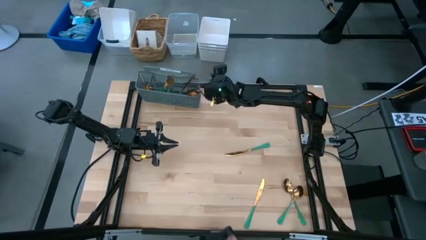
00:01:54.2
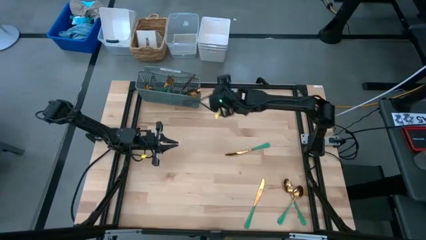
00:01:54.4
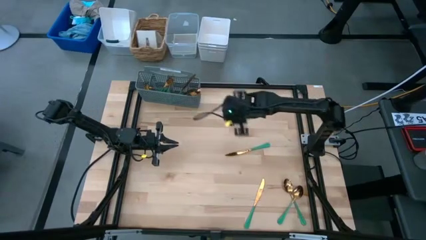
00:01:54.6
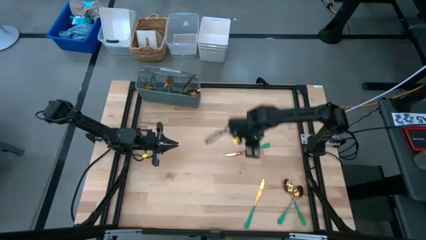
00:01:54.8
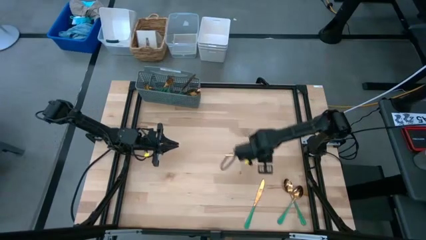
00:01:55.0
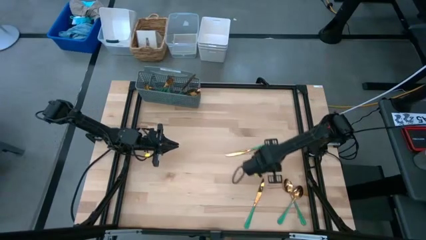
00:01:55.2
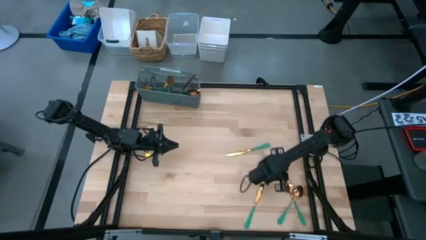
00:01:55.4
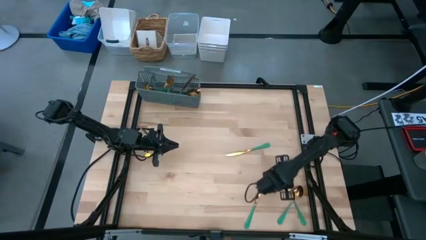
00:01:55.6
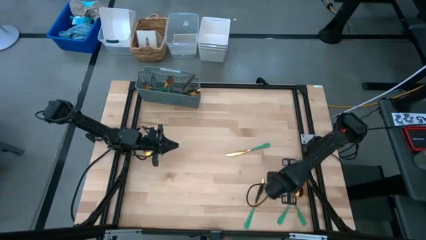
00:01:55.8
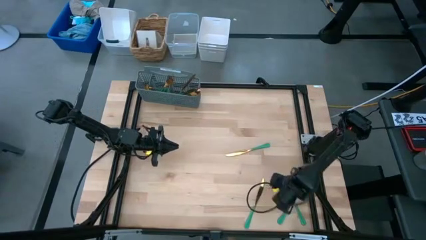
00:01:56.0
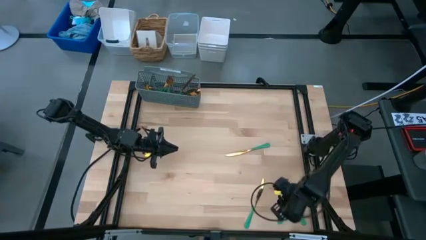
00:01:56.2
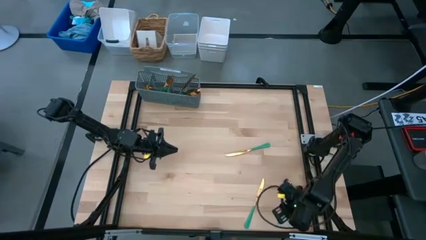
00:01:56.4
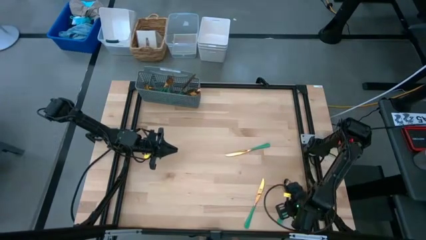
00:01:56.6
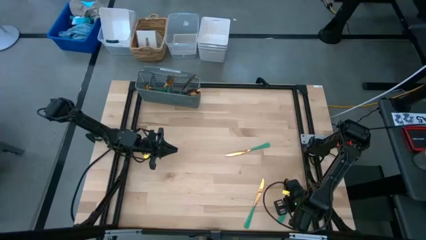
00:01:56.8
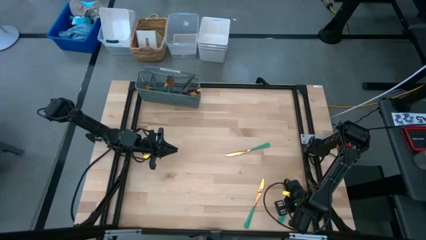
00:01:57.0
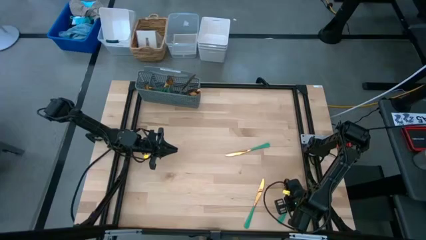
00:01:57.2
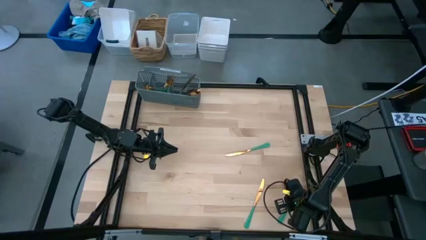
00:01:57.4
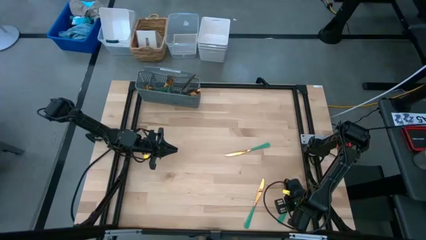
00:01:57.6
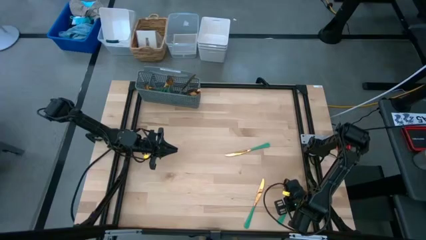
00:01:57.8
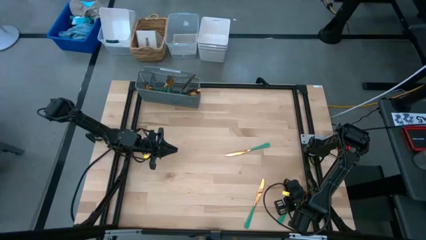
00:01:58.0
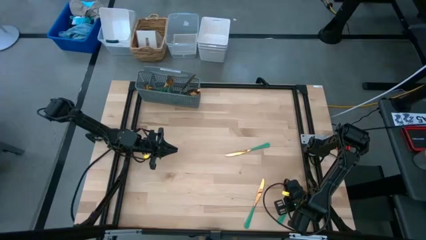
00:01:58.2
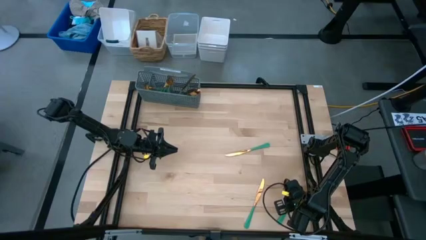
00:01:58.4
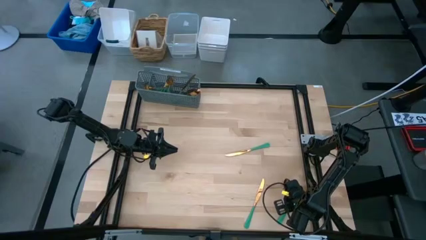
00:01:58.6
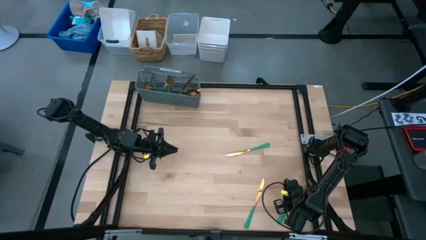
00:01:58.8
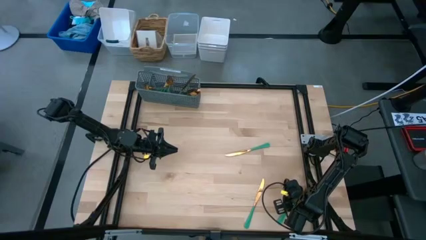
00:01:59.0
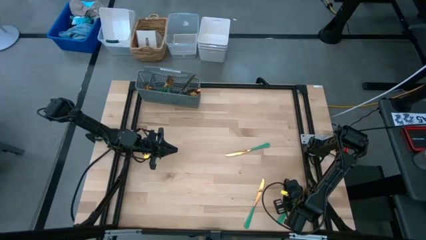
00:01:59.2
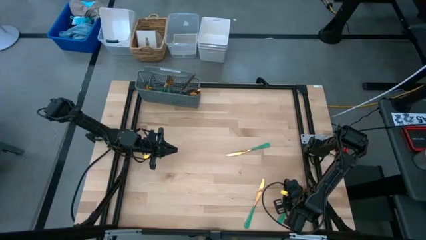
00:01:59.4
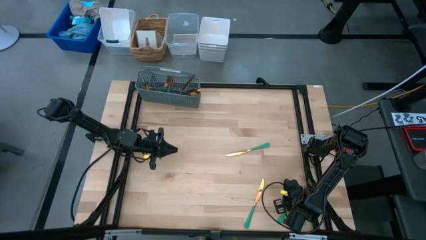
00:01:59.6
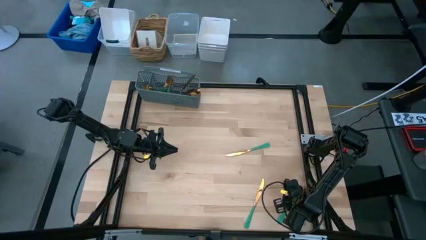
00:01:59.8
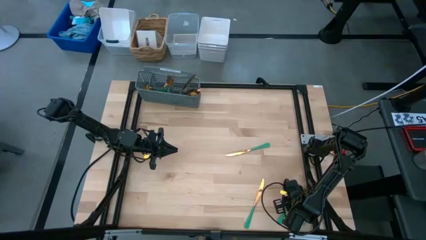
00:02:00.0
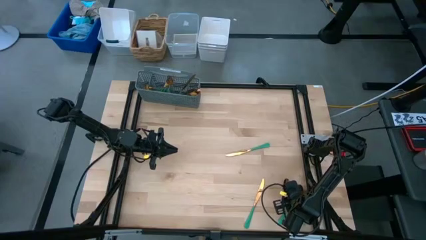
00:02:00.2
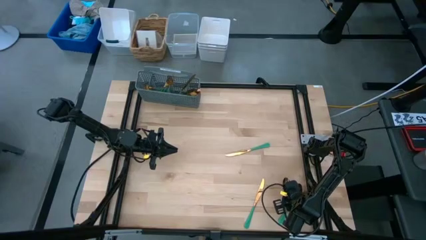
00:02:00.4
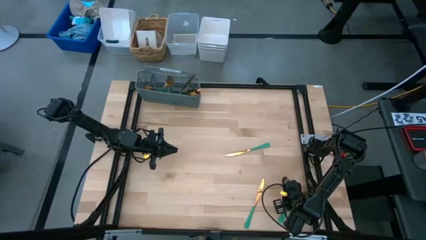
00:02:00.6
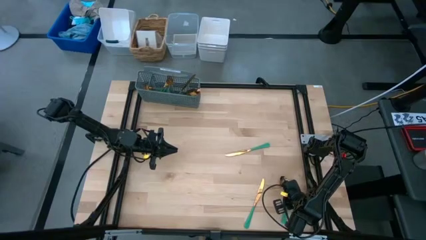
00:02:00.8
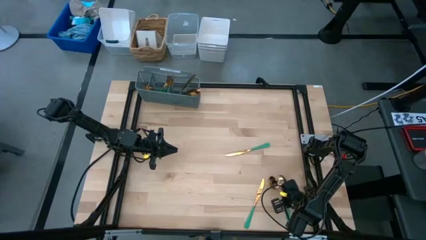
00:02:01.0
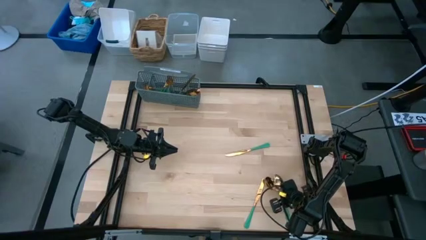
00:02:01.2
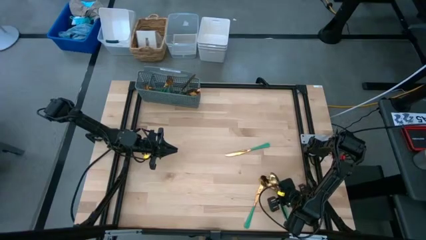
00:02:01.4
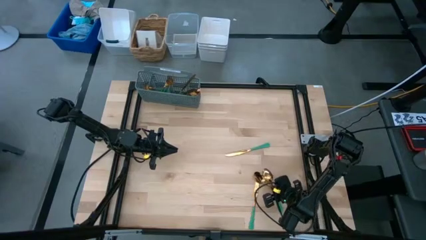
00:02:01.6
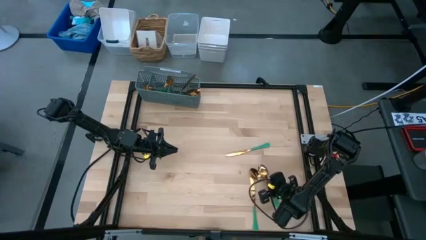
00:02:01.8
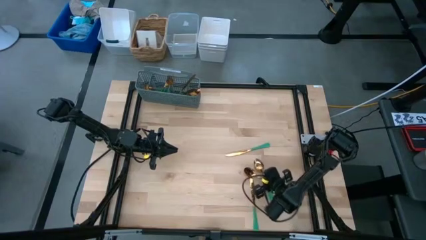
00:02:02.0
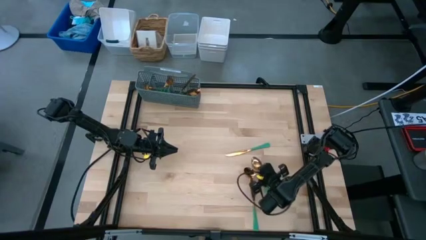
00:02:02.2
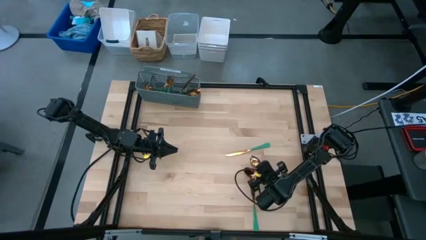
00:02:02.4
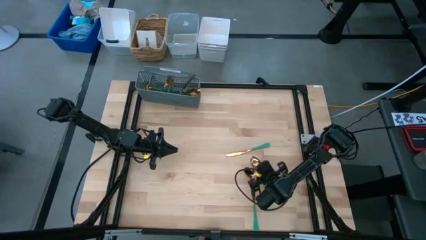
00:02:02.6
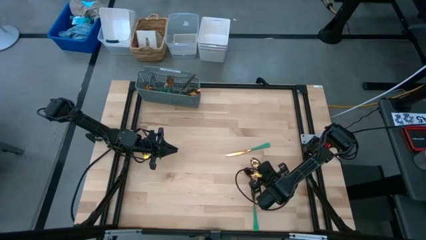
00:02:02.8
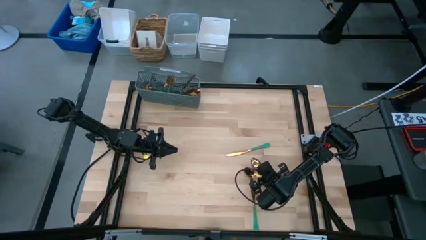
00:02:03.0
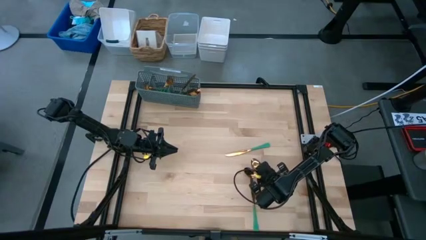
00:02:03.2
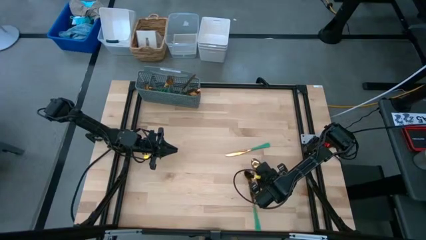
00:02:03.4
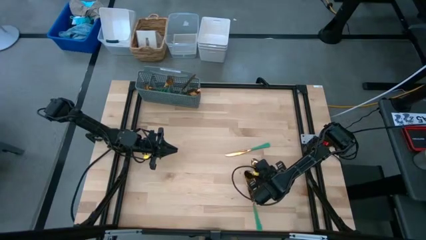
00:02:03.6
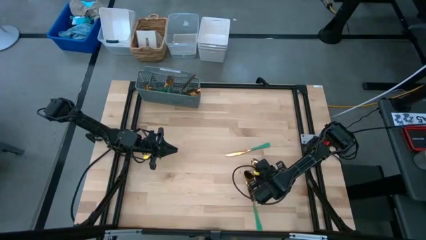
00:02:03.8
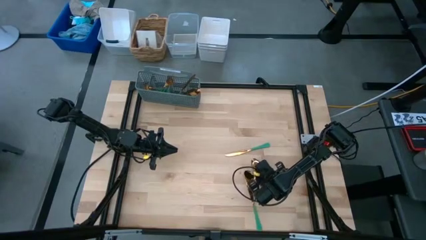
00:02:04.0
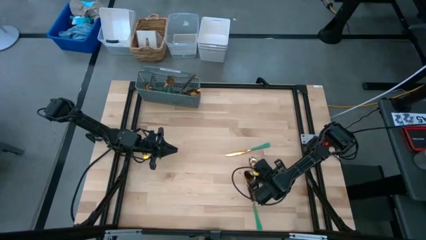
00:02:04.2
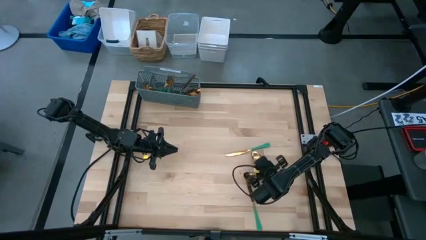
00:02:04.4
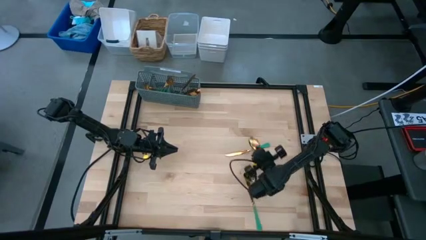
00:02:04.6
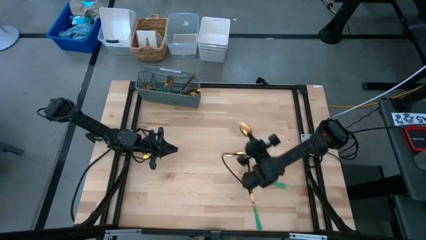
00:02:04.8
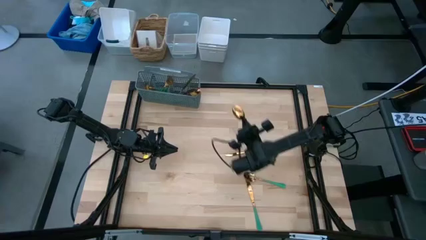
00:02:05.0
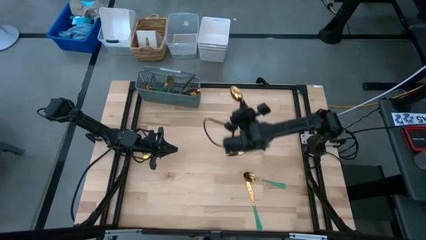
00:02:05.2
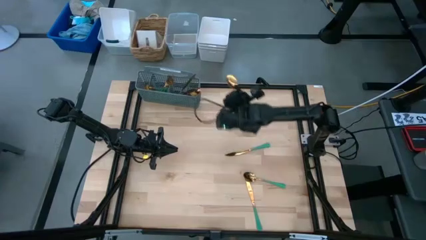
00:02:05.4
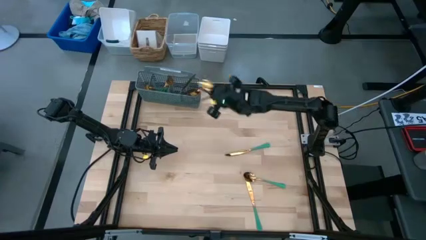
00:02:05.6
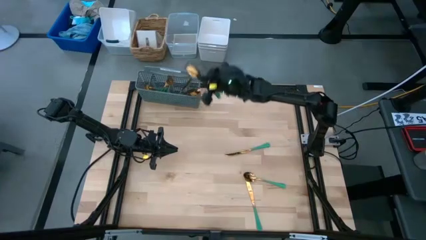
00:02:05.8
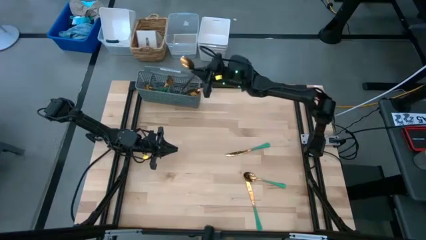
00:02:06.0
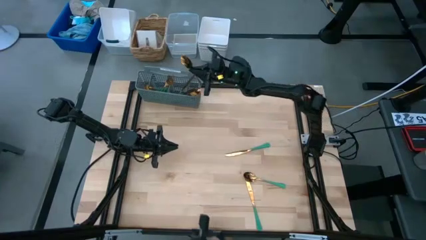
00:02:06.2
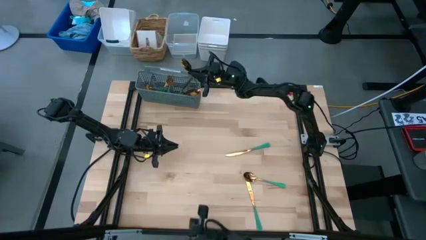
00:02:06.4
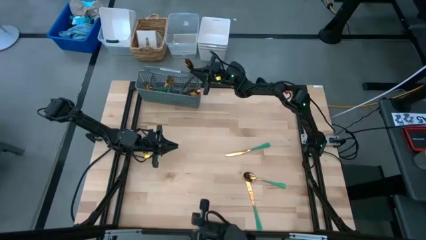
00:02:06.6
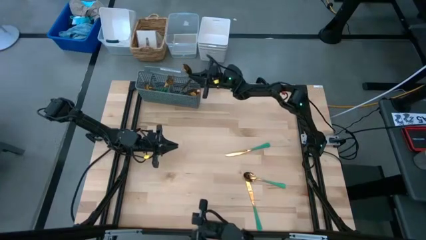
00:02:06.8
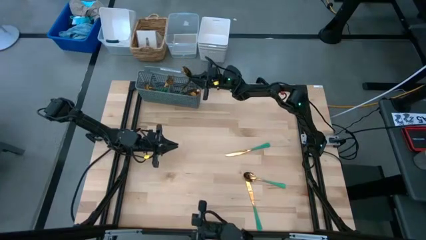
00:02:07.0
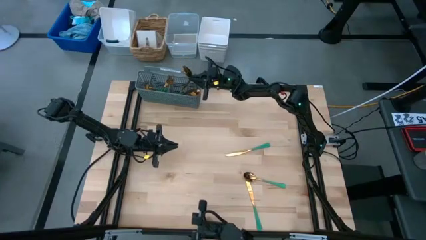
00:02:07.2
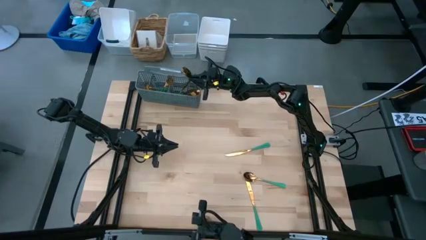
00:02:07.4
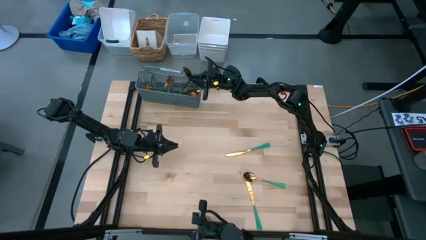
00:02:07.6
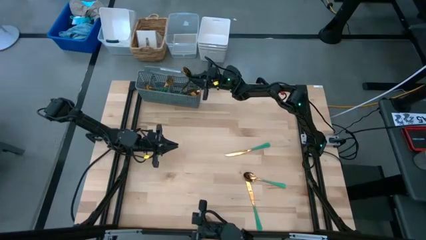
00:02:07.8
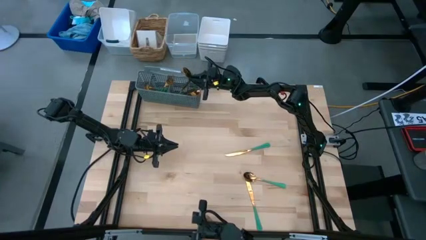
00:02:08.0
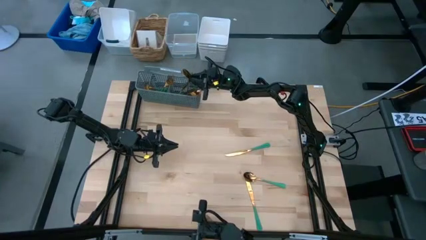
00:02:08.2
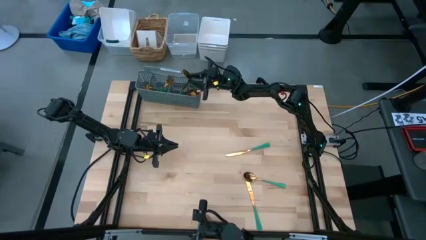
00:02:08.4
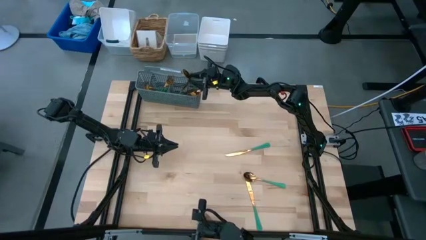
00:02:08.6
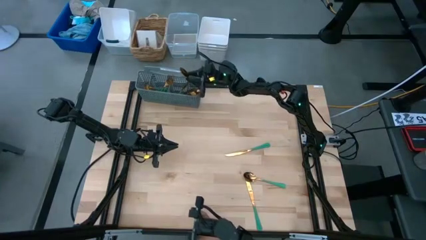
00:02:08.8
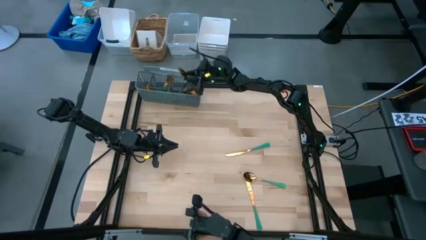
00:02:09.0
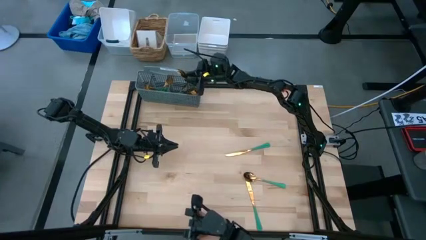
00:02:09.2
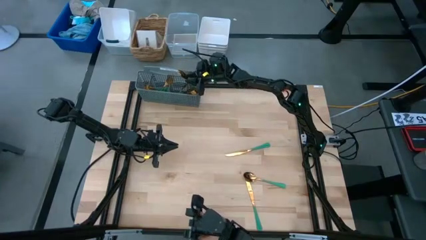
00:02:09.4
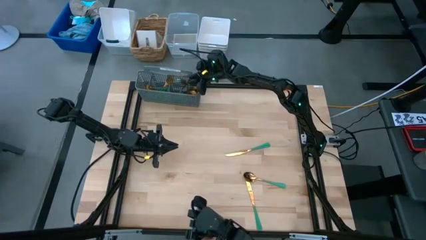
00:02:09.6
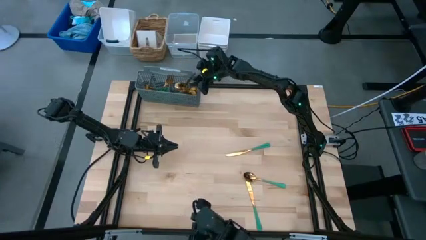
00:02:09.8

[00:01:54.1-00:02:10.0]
Task: Sort silverware
Put the green spoon into the gray silverware basket

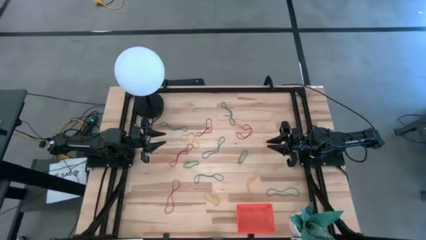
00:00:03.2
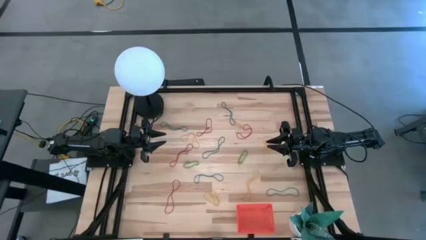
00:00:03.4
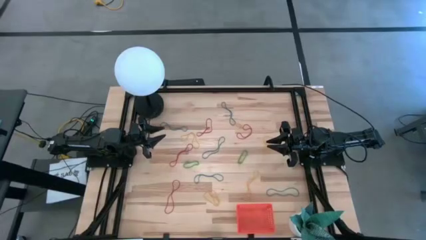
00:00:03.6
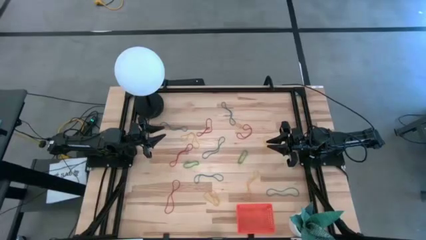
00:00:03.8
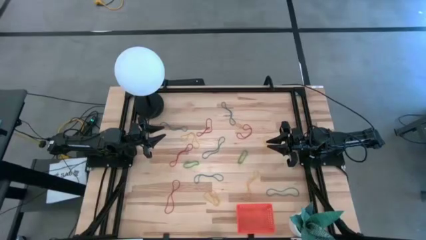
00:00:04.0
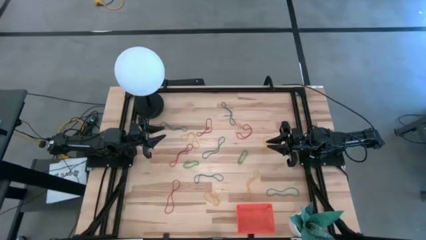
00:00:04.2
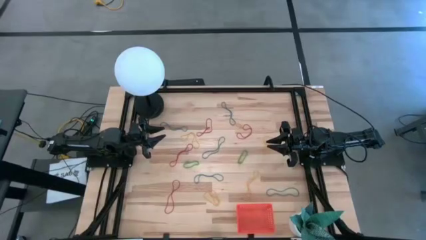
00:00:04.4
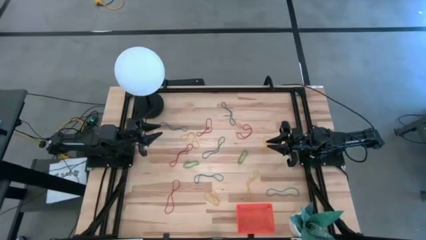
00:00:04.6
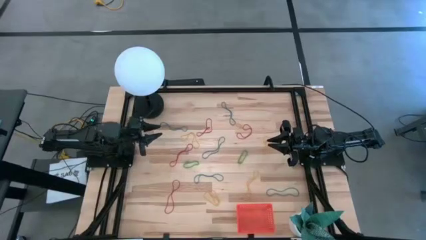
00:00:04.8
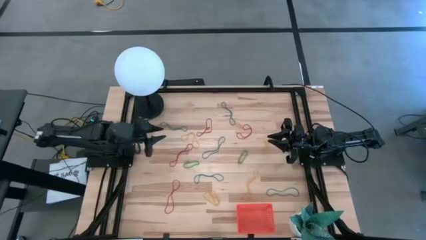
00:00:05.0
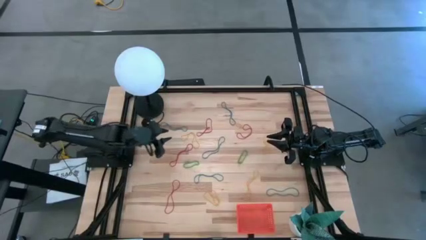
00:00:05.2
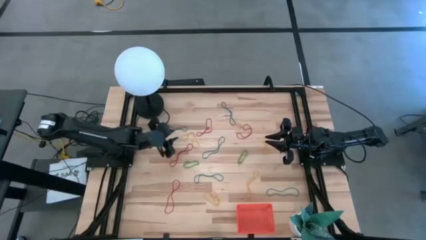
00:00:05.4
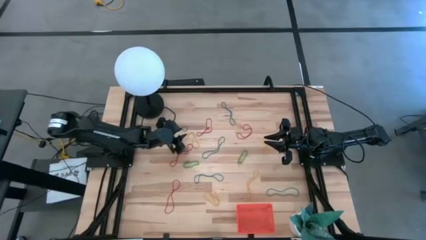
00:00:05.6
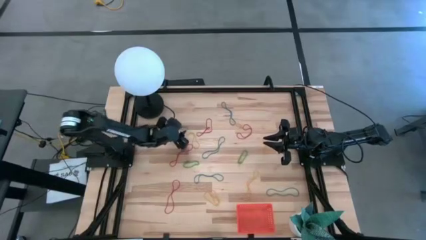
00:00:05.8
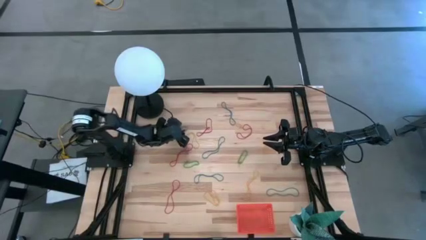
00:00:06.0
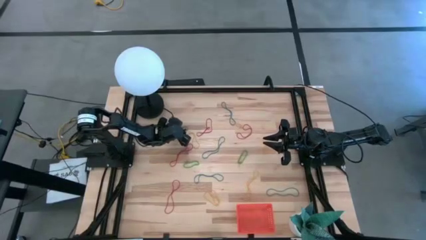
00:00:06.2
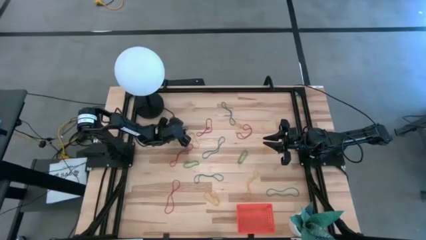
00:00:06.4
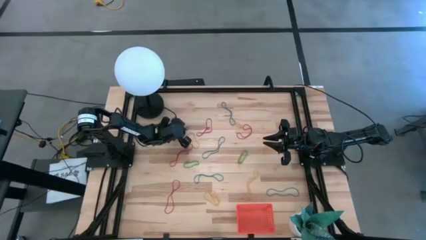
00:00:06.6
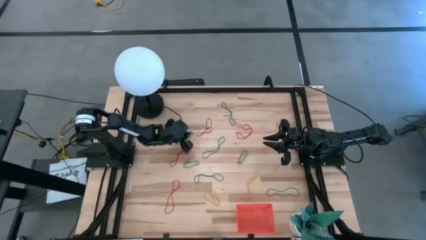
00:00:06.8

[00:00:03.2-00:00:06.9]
Task: Pick and place items into bin
Put the blue rubber band into the orange bin
